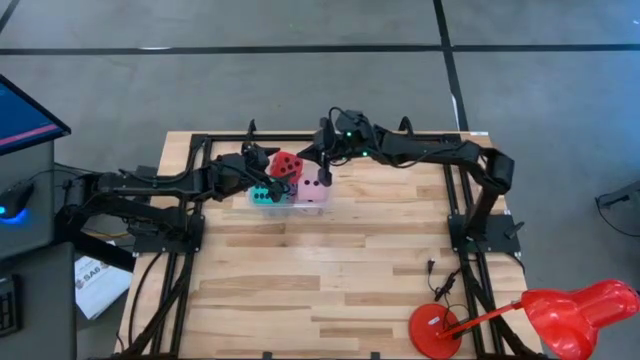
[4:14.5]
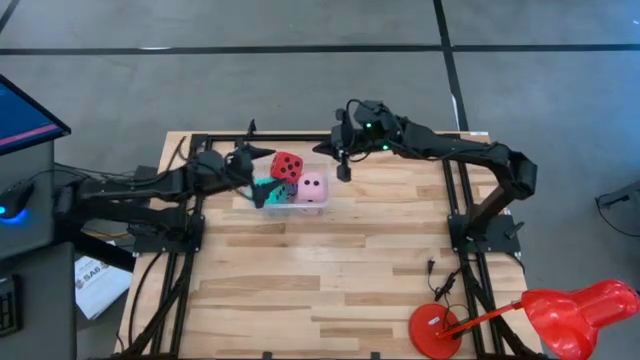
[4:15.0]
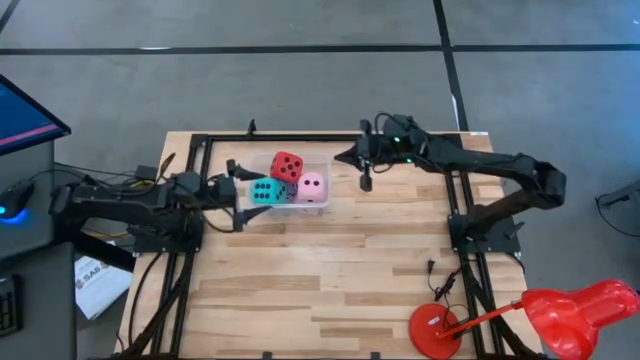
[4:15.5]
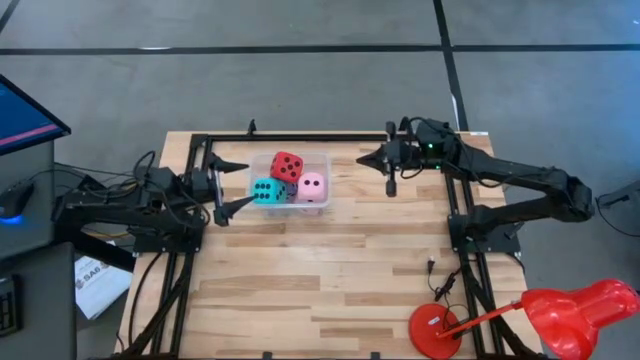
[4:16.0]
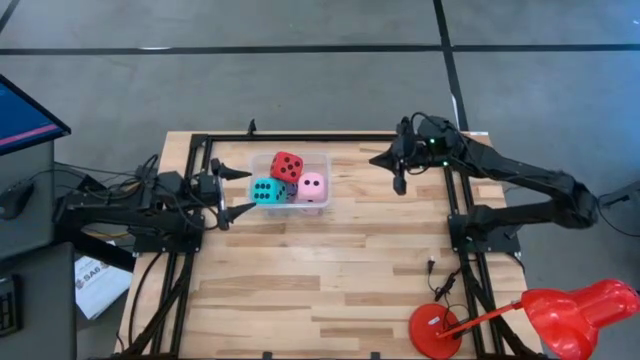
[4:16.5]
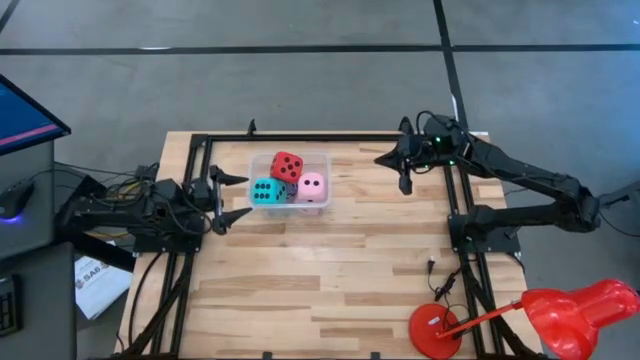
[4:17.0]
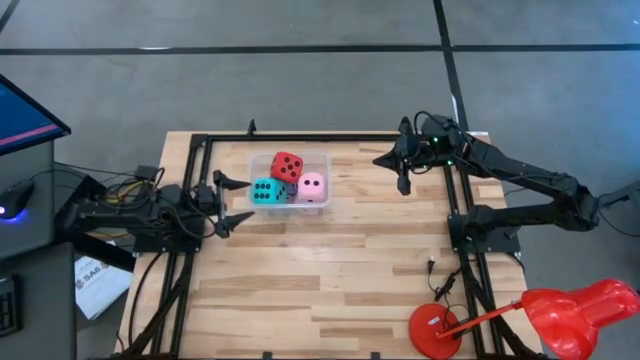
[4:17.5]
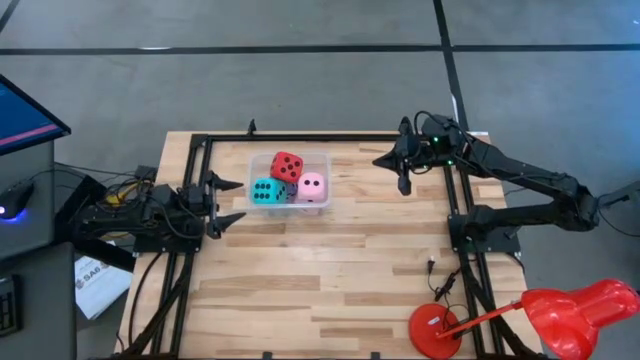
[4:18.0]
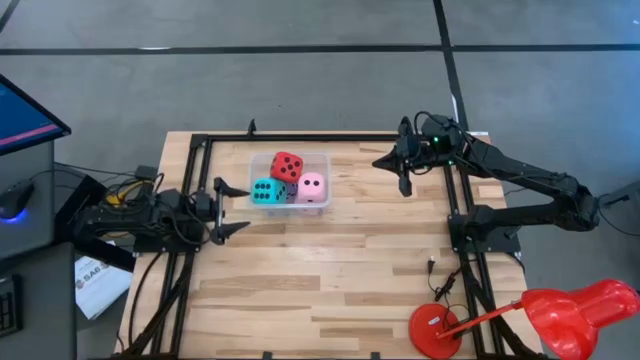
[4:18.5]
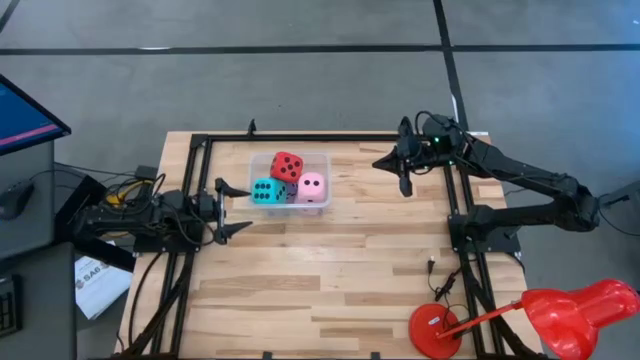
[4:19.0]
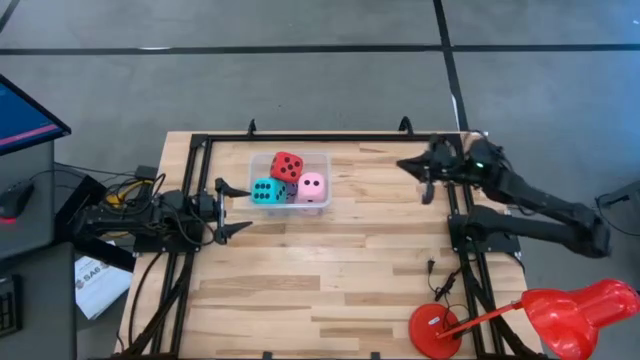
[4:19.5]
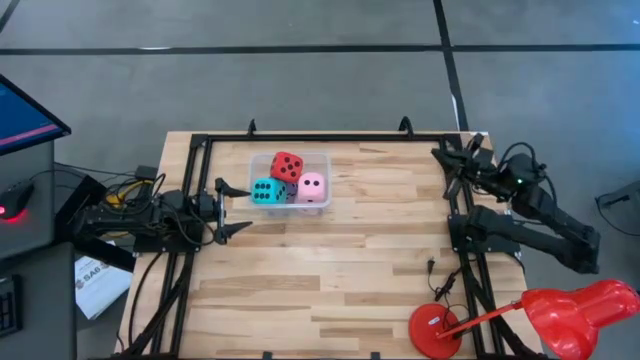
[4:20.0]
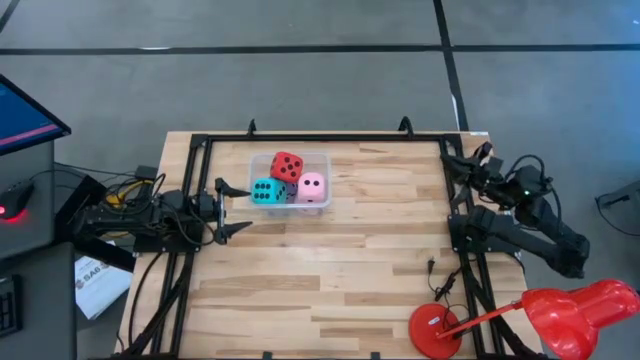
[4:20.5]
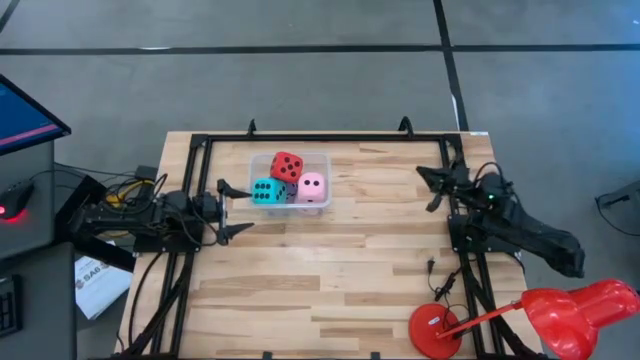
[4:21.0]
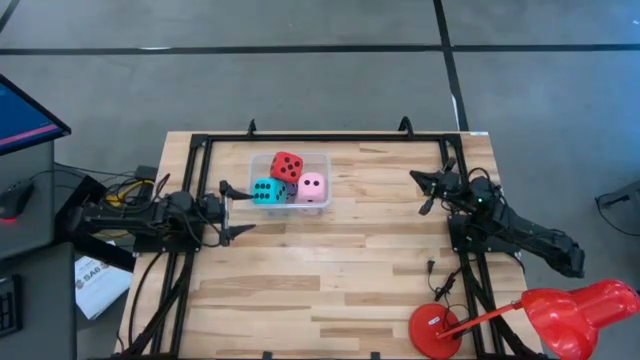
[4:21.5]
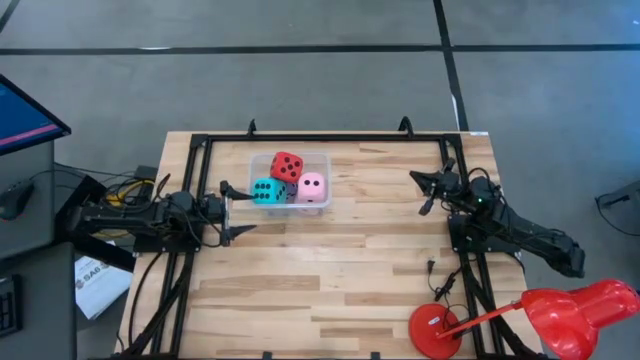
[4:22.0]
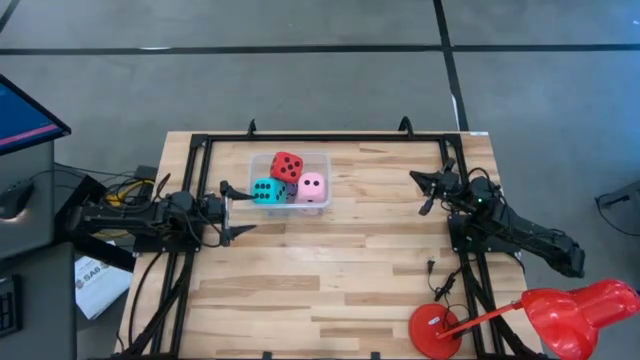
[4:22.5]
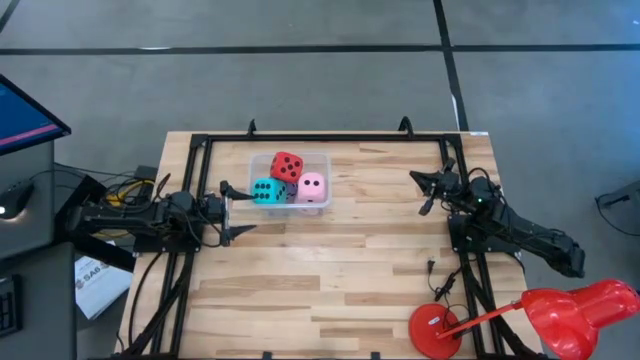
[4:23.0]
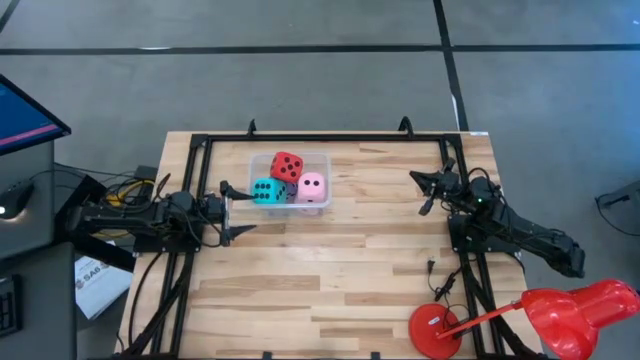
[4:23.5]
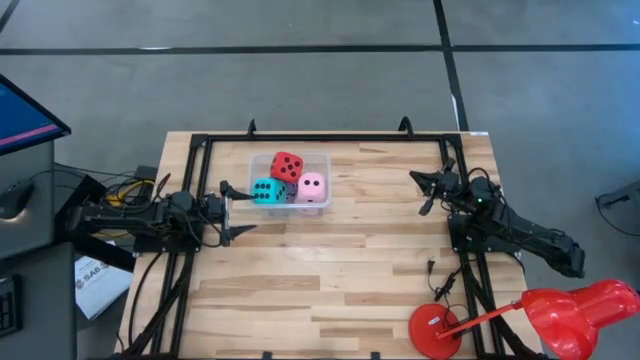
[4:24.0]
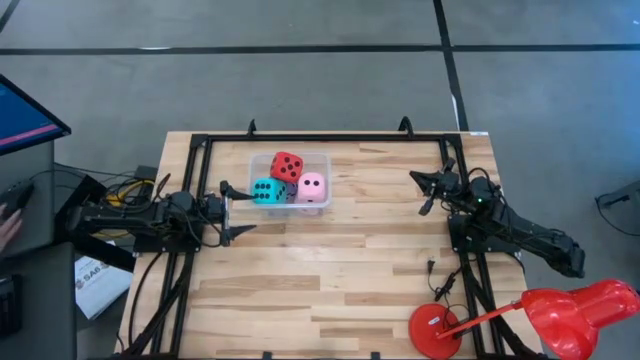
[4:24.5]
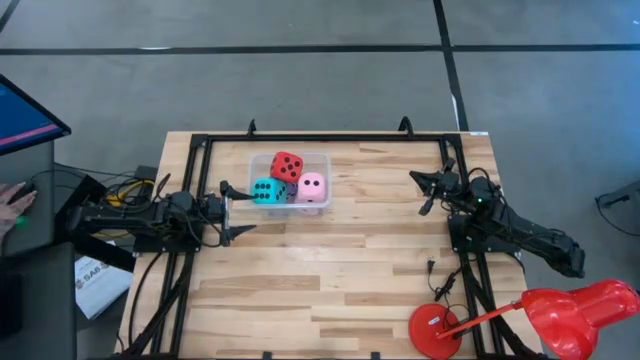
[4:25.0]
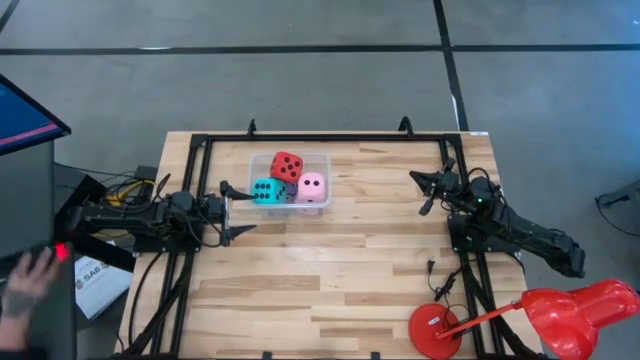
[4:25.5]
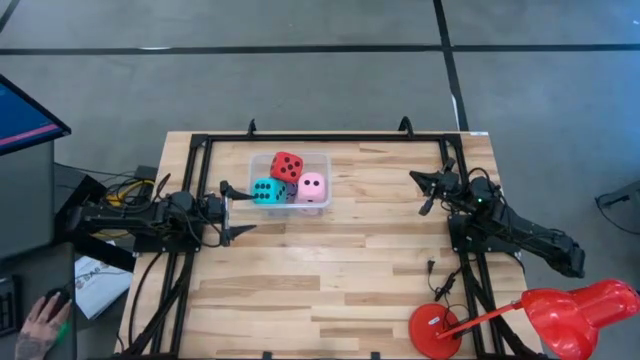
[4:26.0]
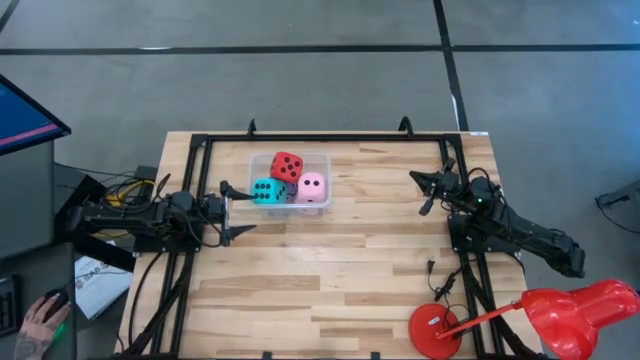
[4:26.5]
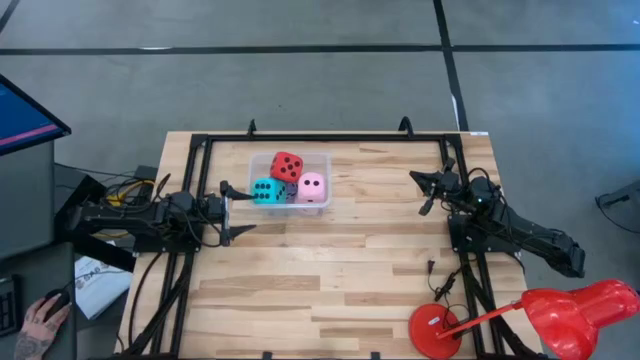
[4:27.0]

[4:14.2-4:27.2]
Task: Pick & Place Dice
Return to Home Position

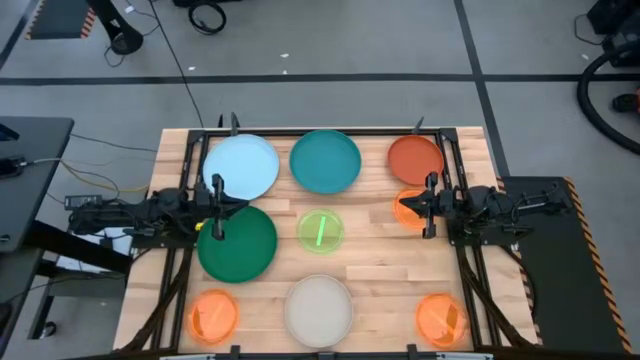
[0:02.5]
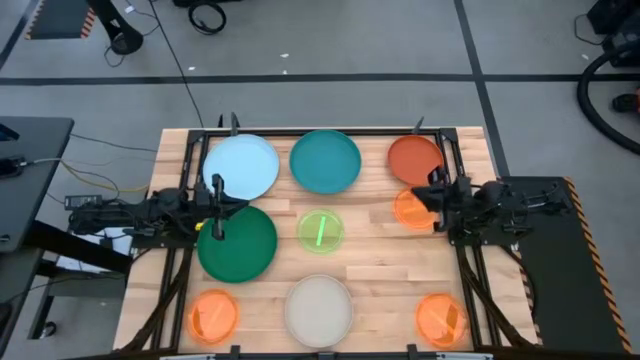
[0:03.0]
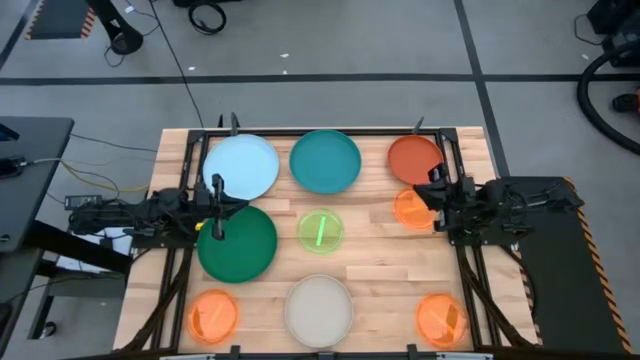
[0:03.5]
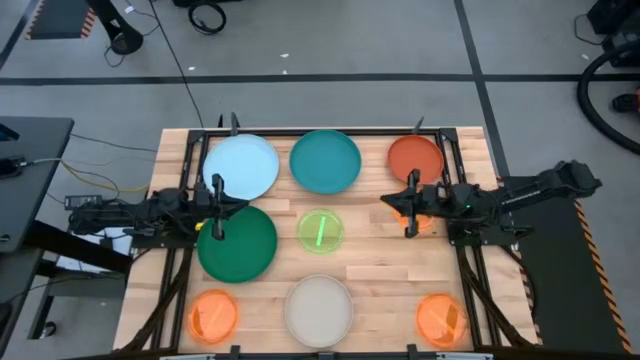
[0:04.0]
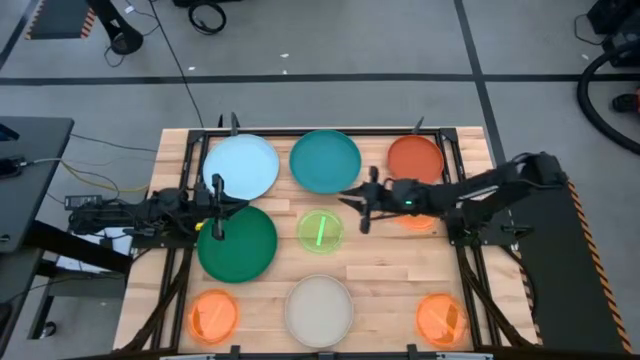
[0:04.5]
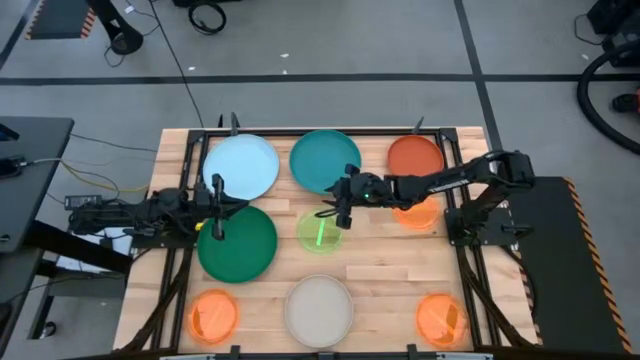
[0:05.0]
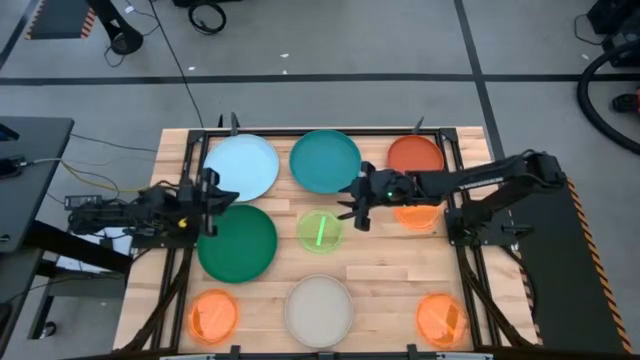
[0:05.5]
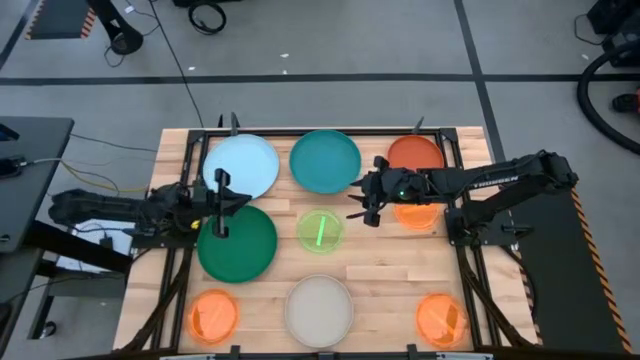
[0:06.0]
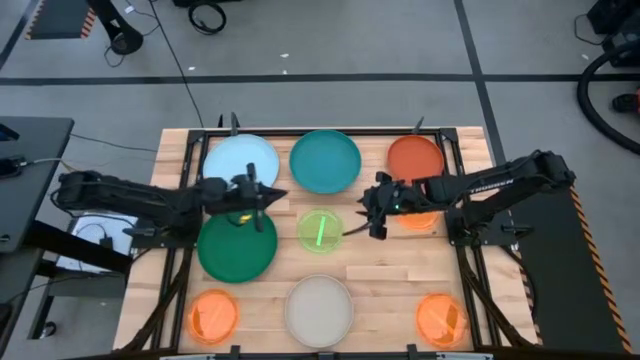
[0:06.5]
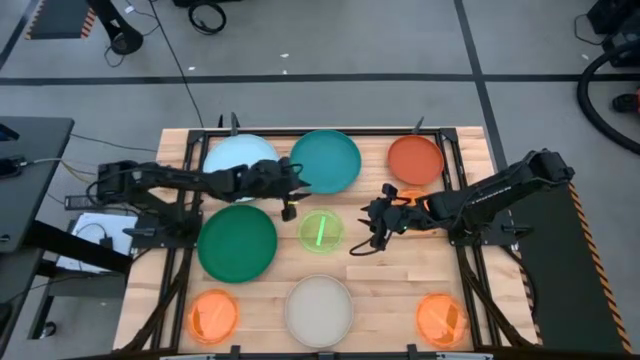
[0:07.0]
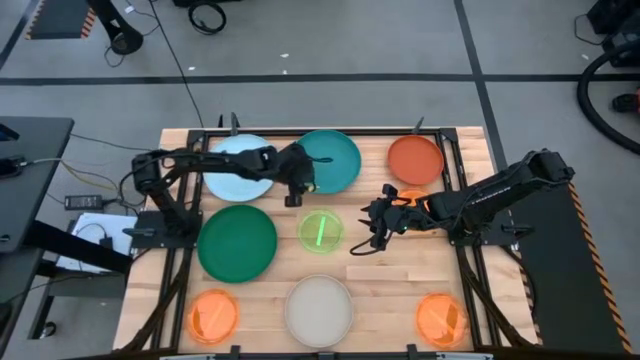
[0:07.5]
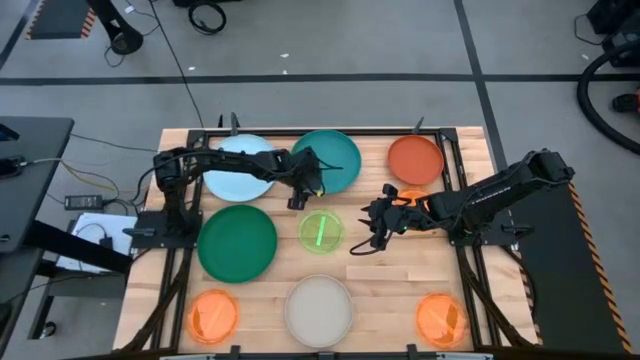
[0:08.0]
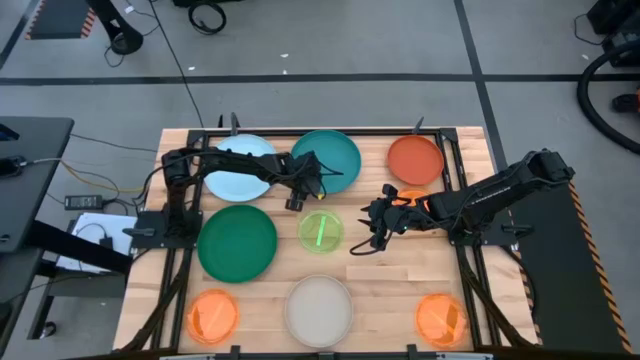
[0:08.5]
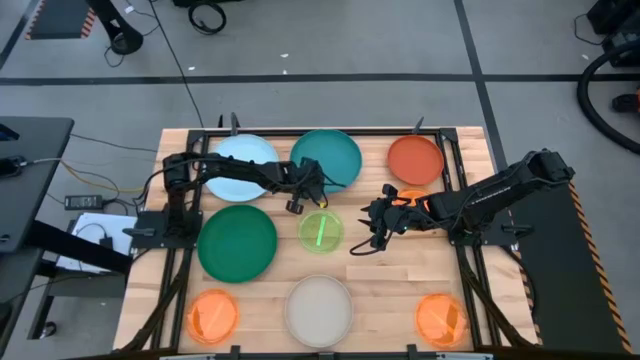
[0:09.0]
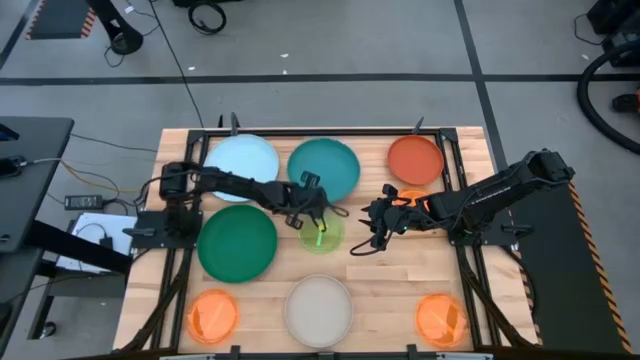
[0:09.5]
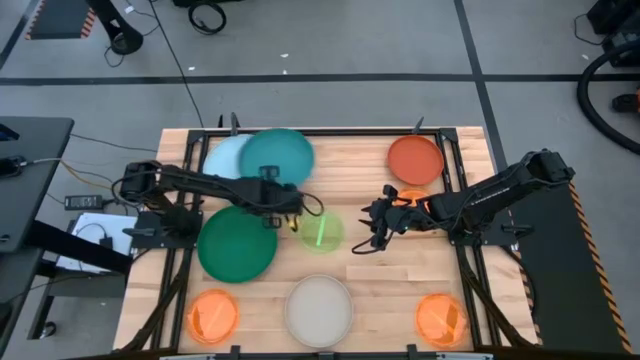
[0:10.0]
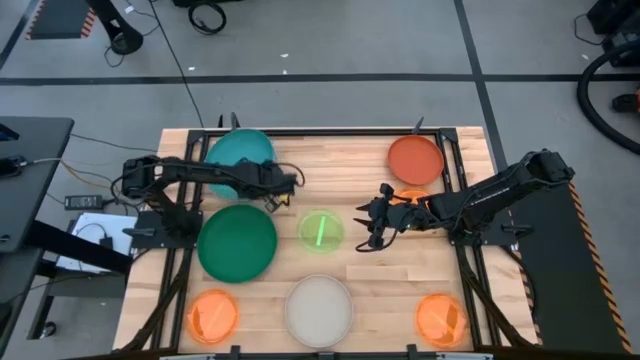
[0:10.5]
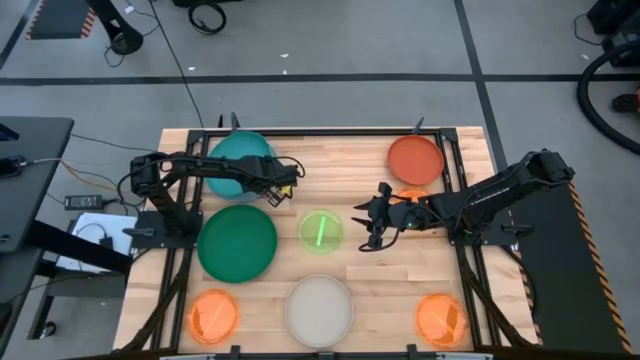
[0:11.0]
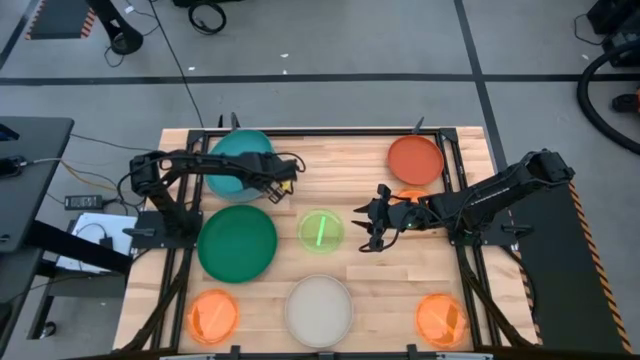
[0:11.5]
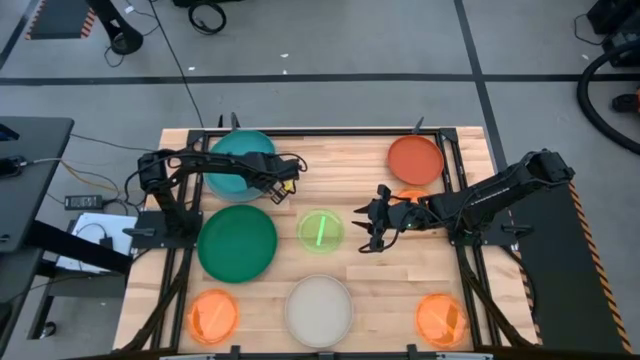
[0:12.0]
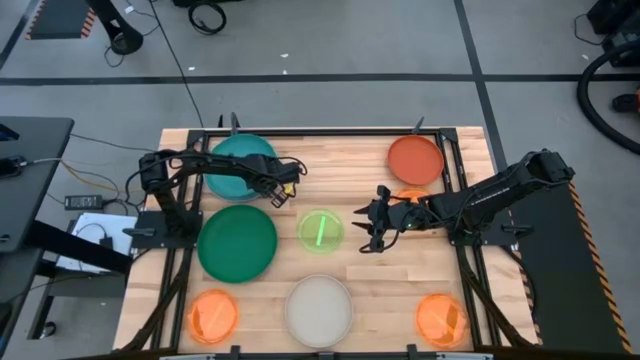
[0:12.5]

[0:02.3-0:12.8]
Task: Stack plastic plates
Stack the blue plate on top of the light blue plate
